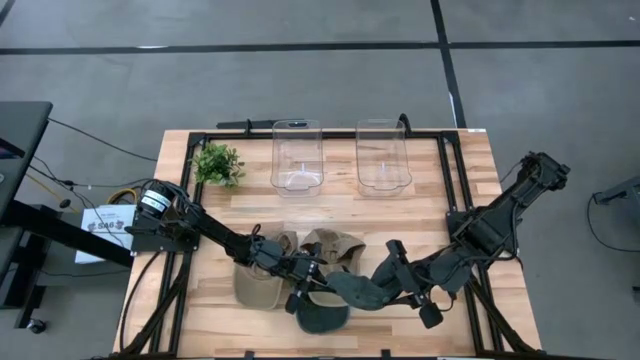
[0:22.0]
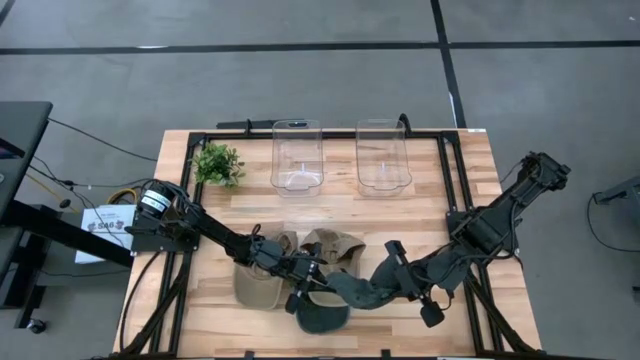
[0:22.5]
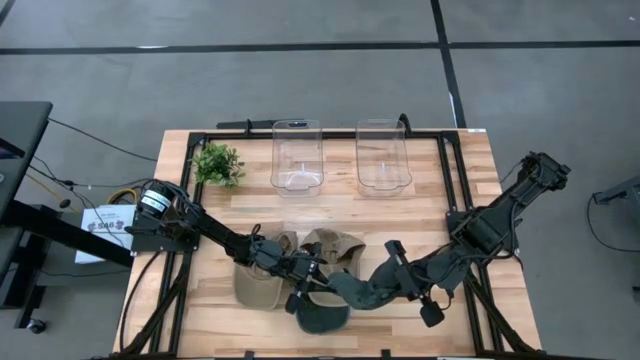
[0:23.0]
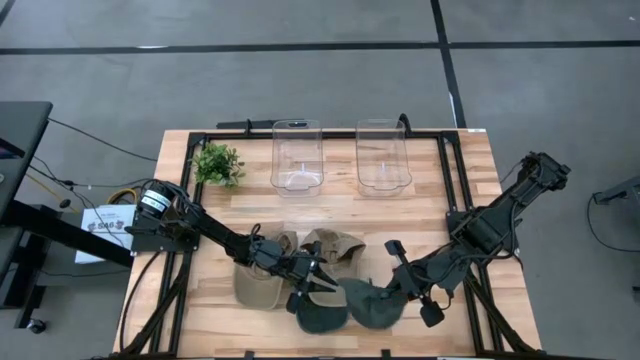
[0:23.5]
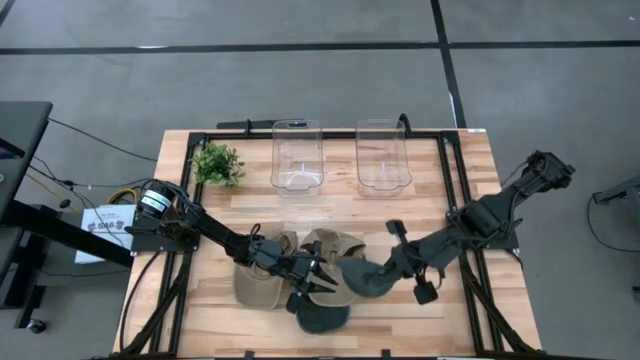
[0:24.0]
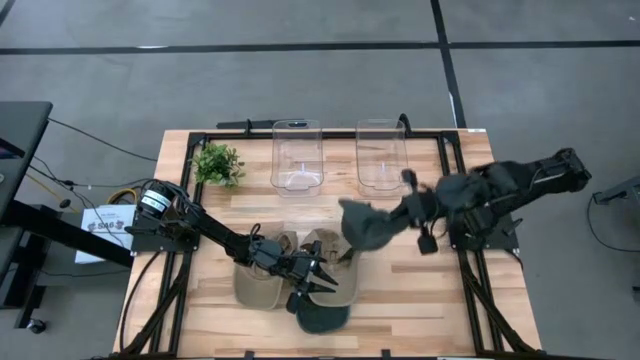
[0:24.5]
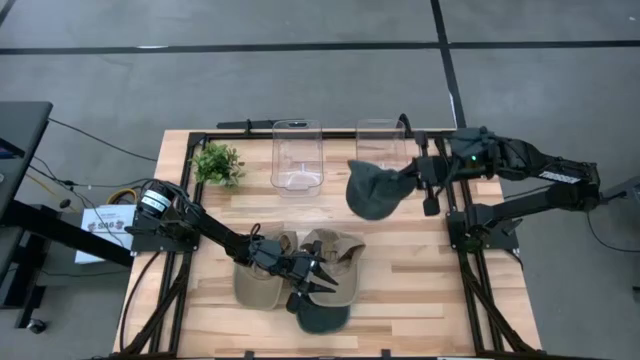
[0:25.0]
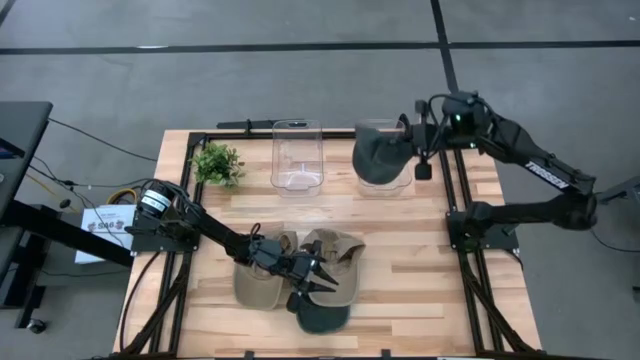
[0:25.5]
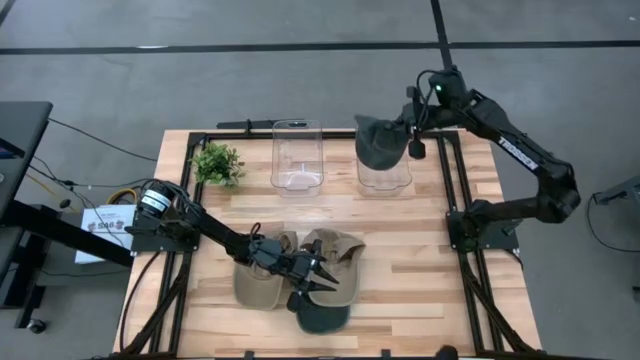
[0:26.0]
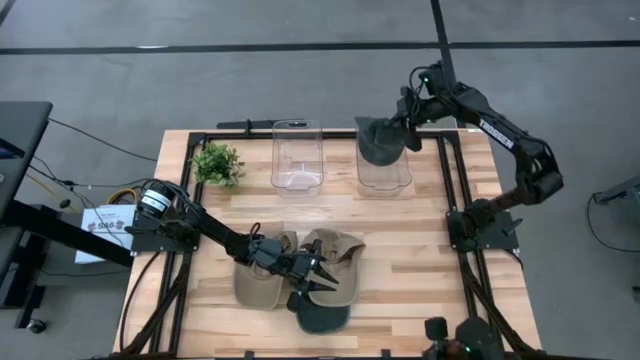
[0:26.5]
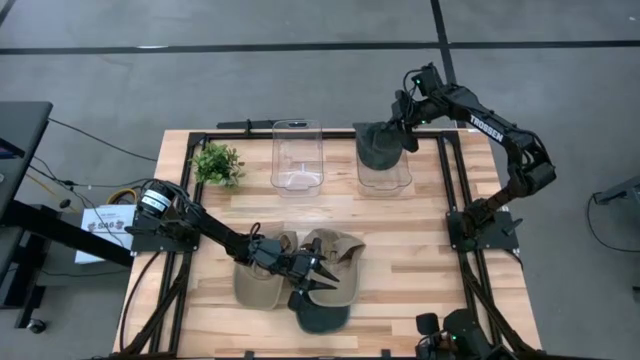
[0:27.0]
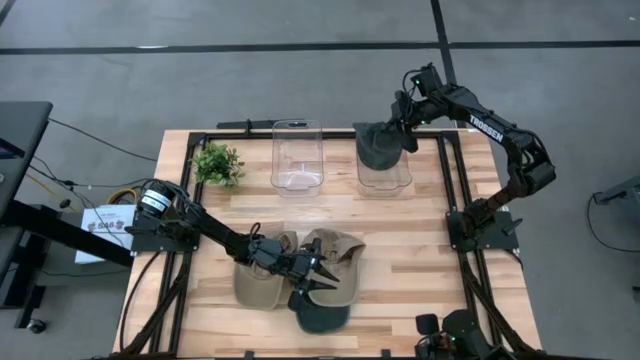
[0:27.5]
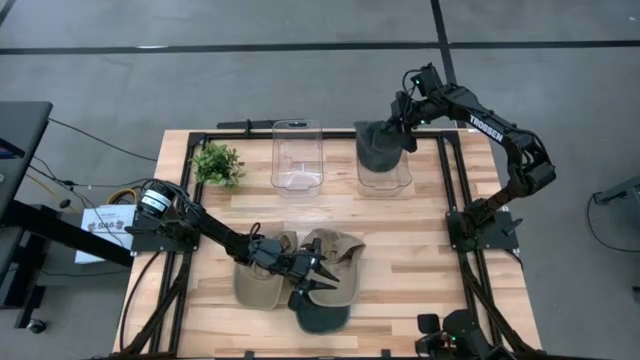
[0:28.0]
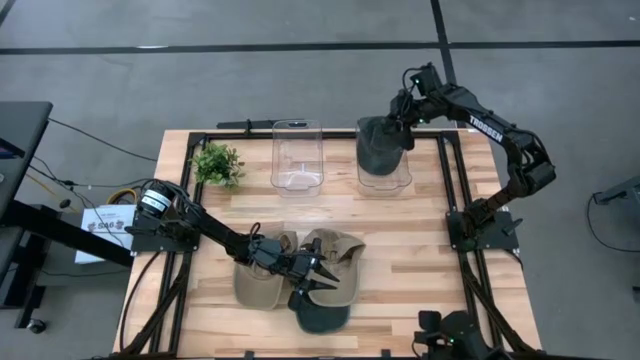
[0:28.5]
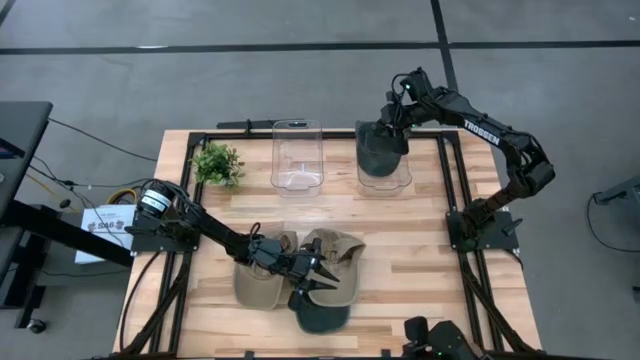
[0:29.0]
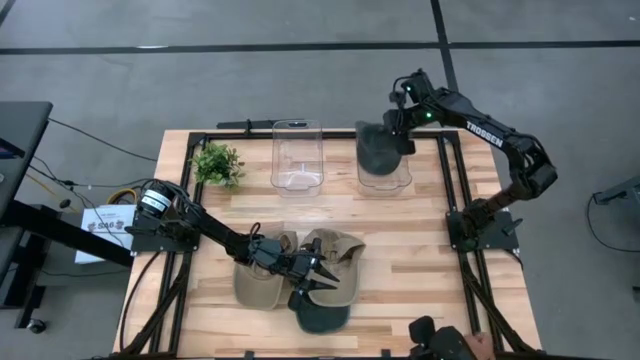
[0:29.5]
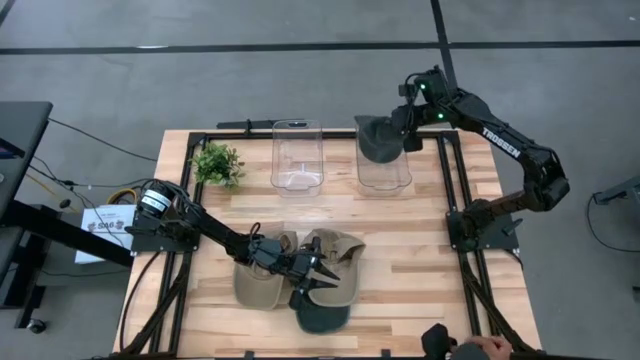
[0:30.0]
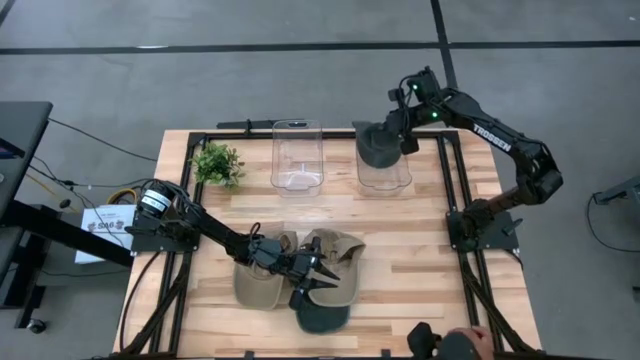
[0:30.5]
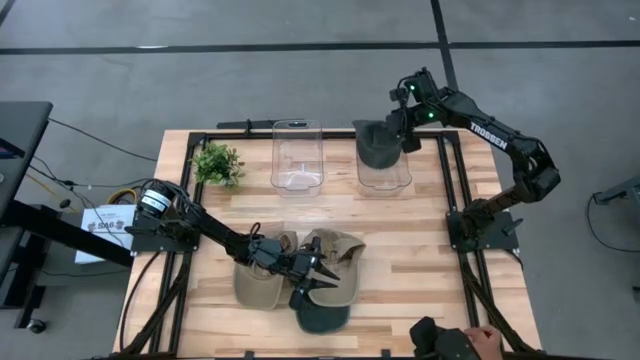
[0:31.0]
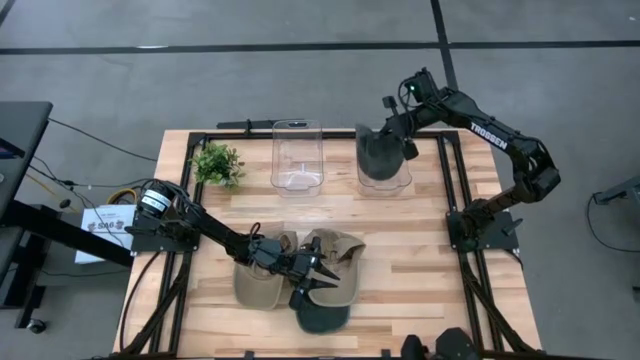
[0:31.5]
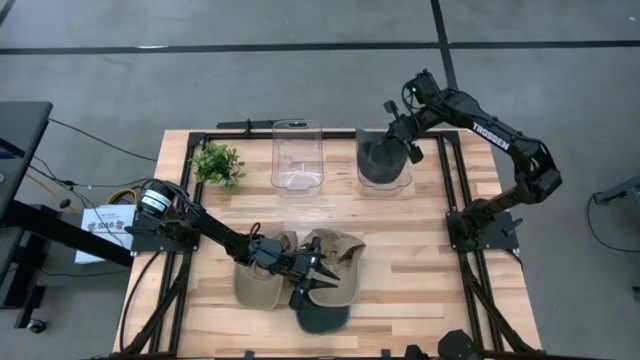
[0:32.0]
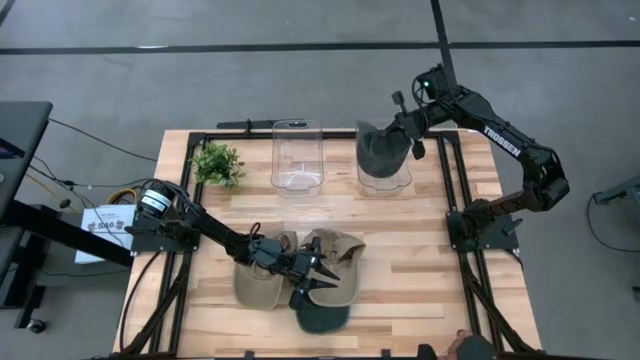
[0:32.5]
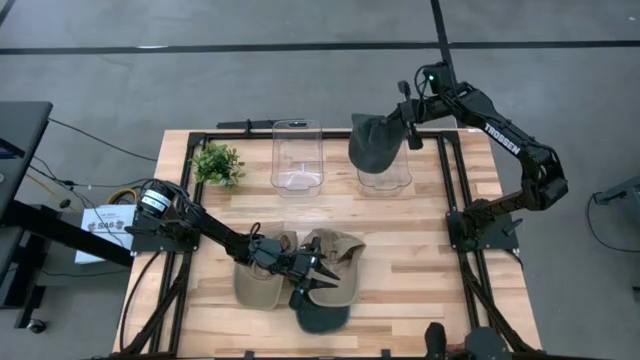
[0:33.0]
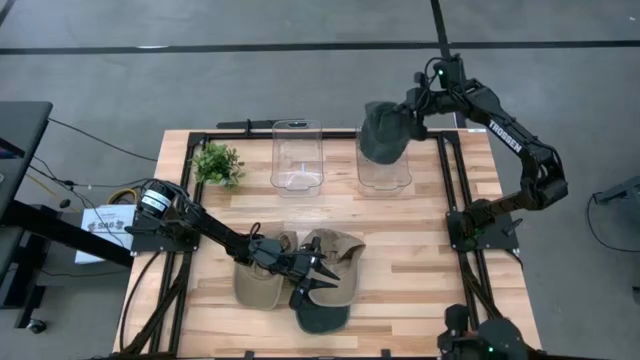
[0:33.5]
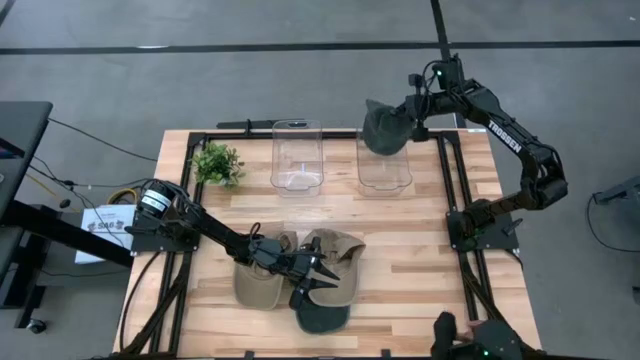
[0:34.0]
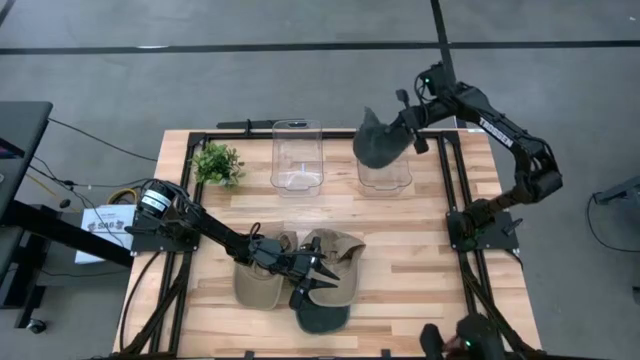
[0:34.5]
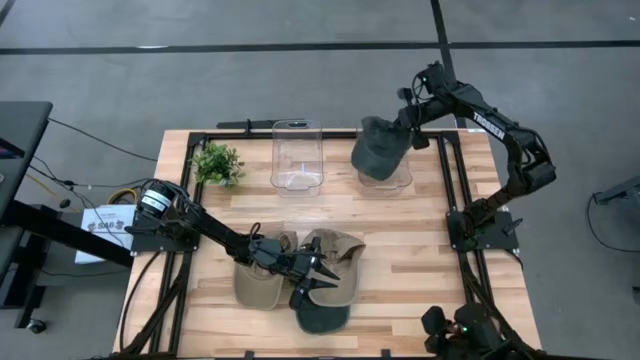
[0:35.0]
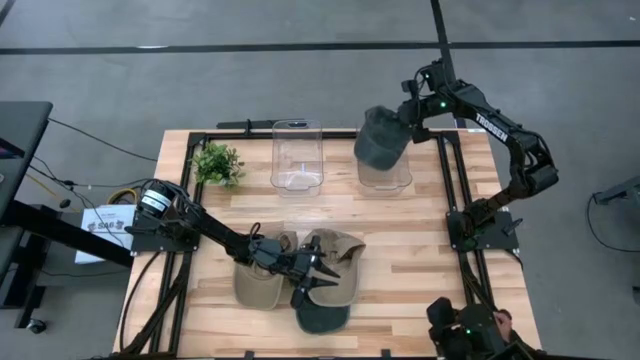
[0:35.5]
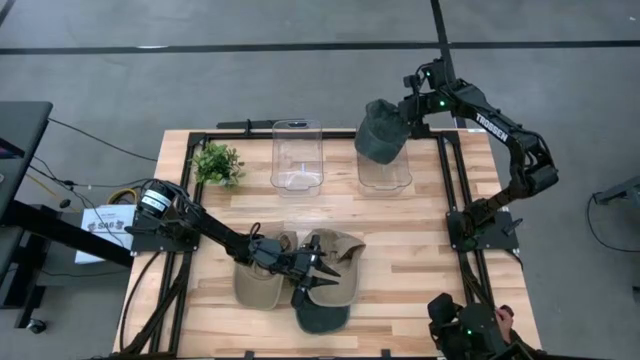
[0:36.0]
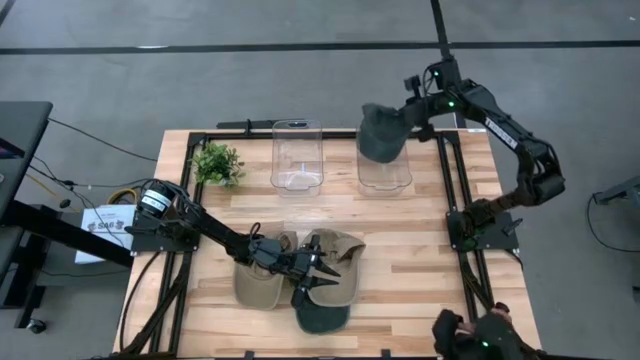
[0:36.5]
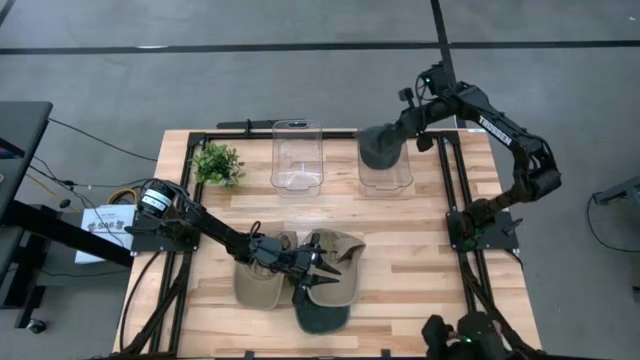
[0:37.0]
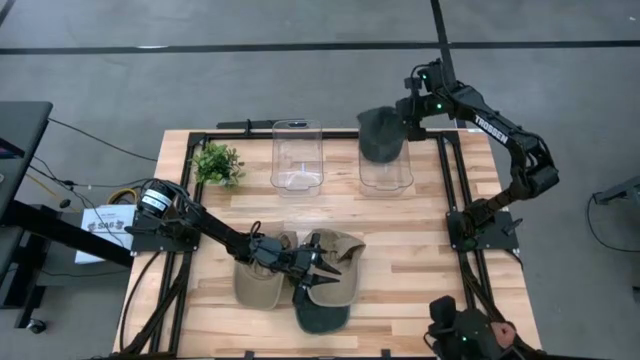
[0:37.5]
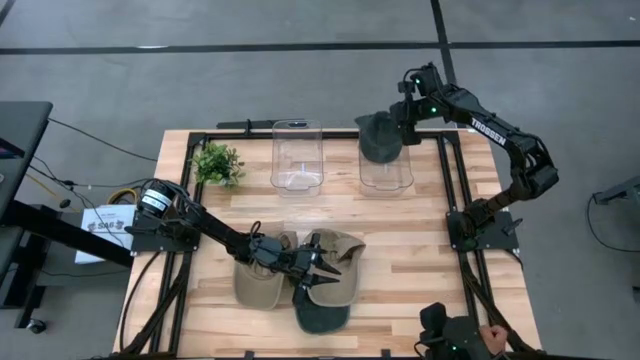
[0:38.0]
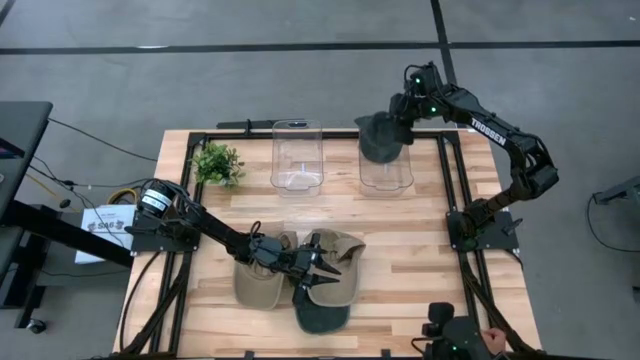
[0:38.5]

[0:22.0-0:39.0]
Task: Pick & Place hat
Put the right black cap into the right transparent bin

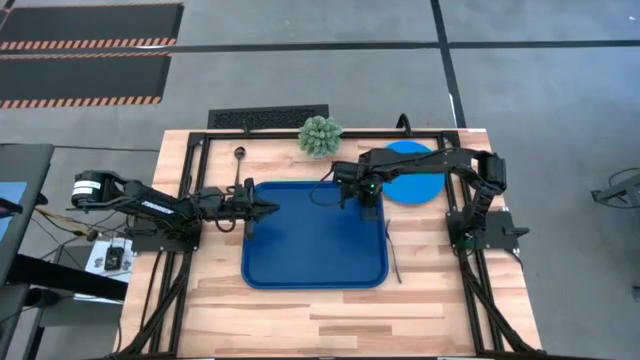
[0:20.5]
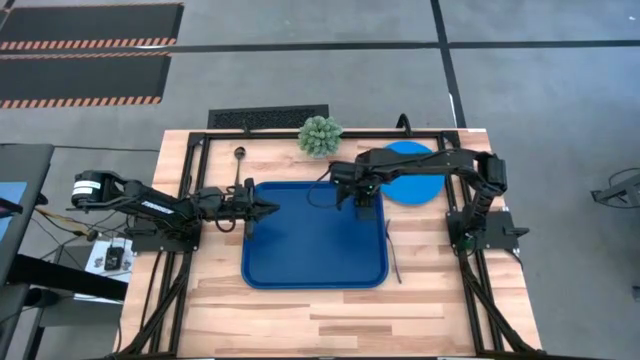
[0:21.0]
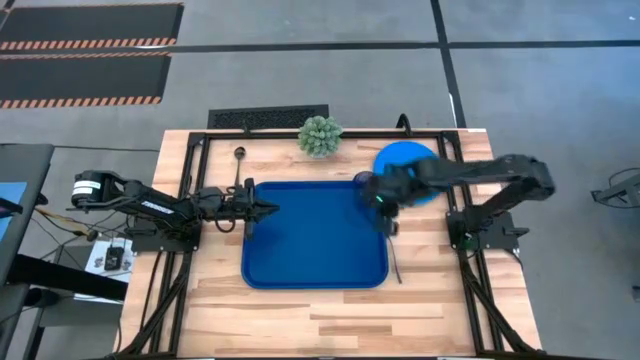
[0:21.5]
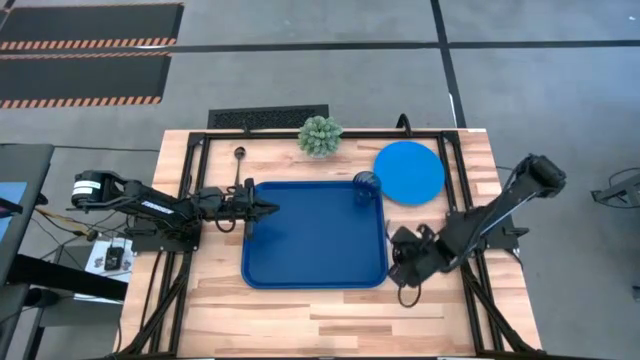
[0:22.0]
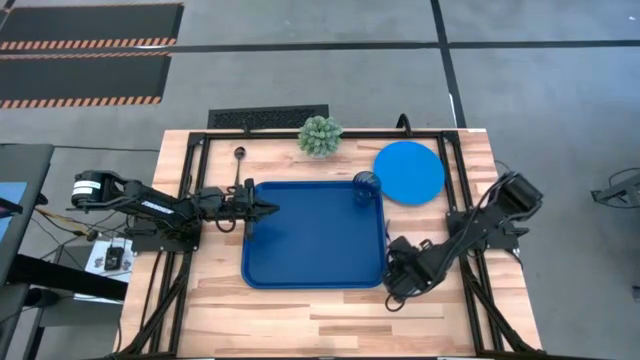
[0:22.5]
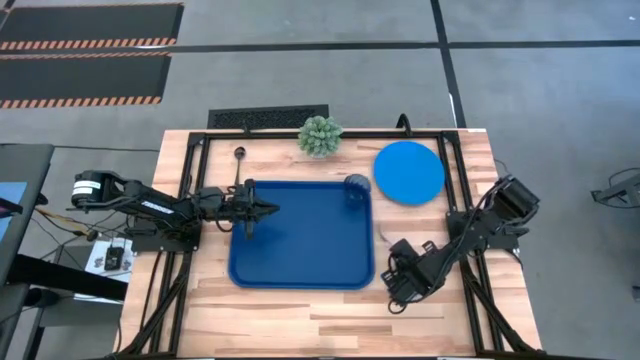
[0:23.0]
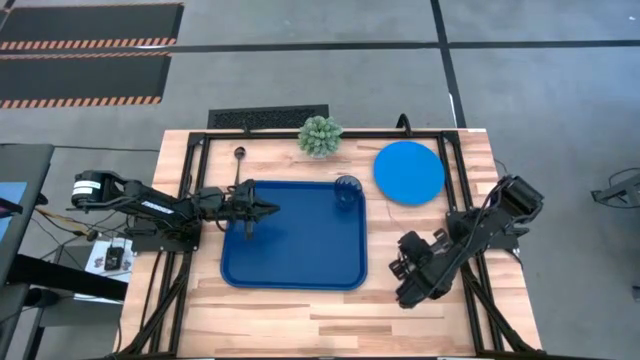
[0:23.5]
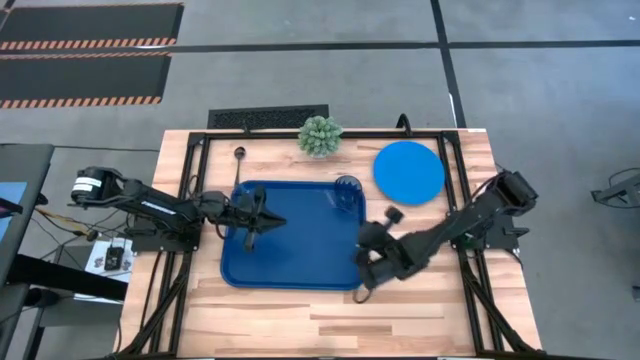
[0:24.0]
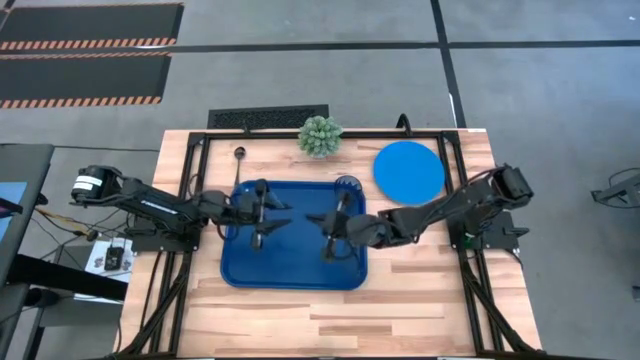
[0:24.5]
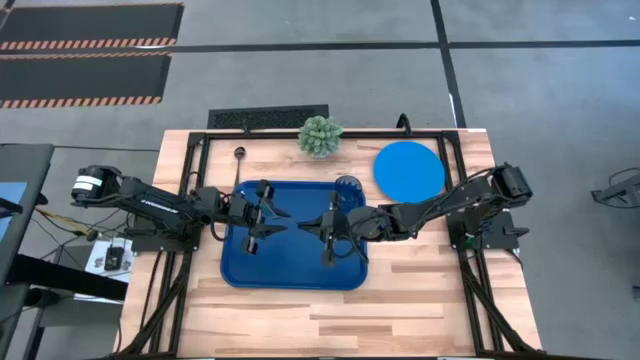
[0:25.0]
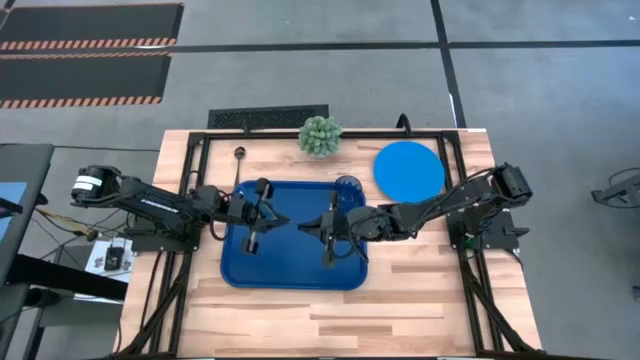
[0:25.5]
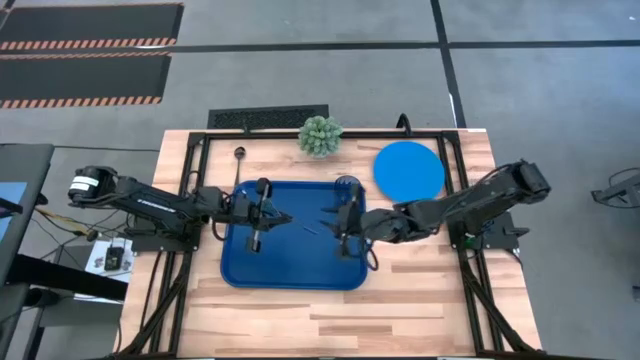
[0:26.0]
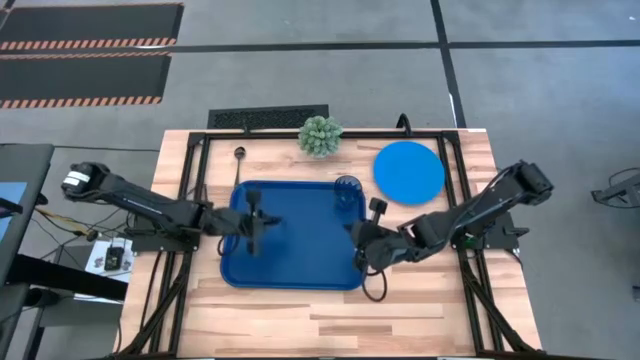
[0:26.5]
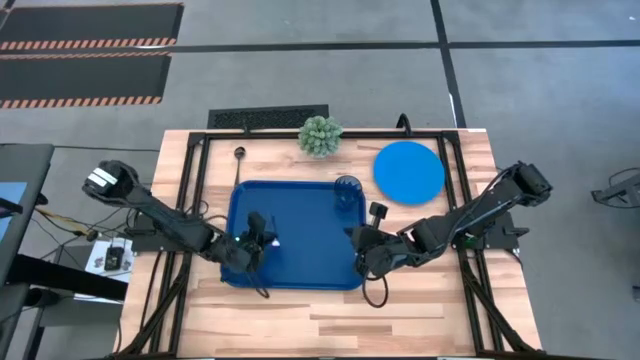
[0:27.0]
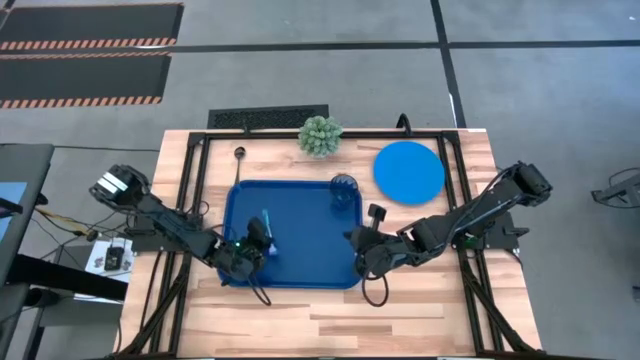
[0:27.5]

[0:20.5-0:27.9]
Task: Pick and place plate/cup/fork/spoon on tray
Put the fork on the top of the blue serving tray
